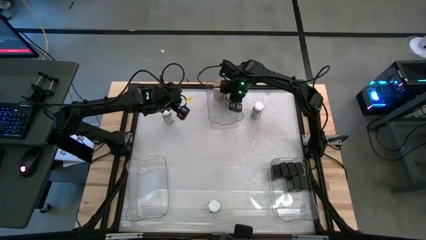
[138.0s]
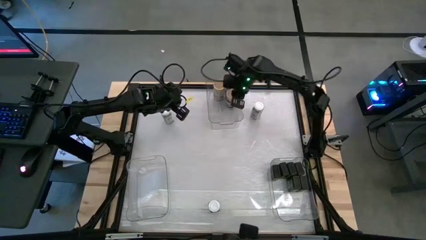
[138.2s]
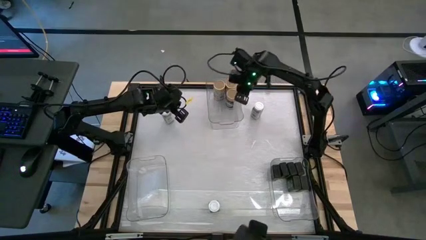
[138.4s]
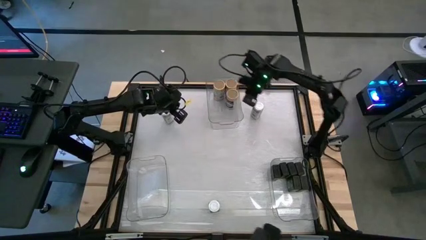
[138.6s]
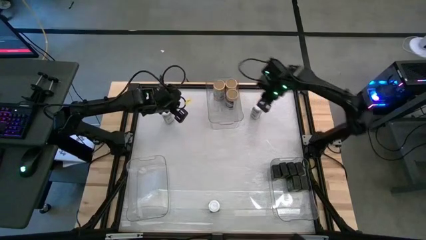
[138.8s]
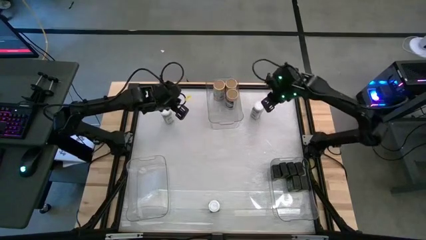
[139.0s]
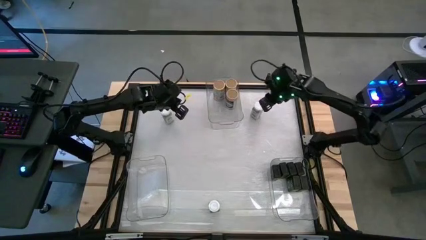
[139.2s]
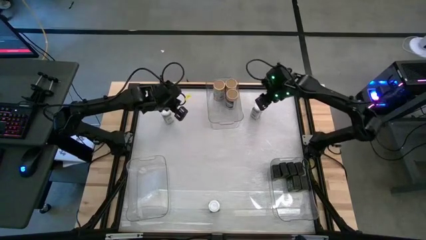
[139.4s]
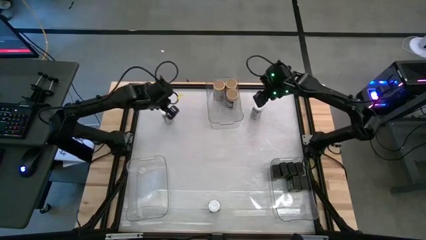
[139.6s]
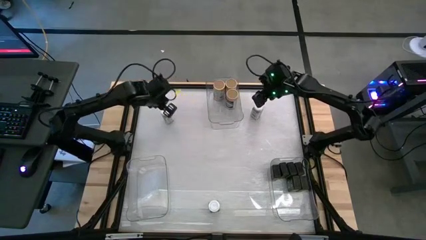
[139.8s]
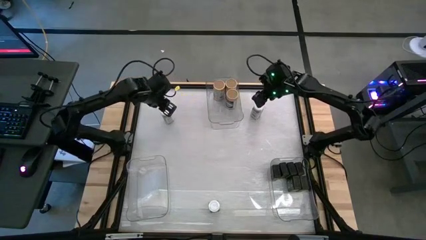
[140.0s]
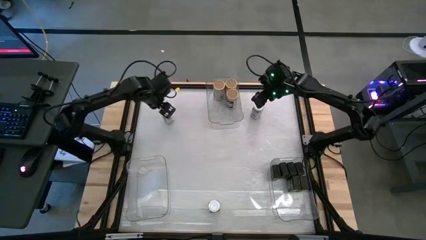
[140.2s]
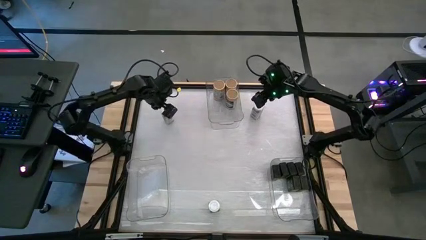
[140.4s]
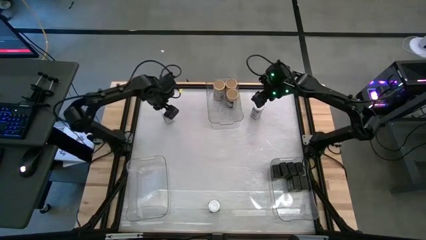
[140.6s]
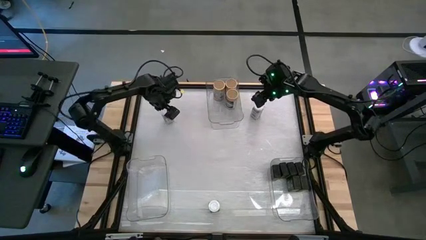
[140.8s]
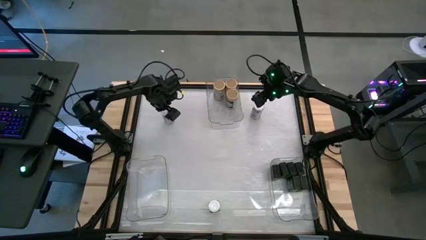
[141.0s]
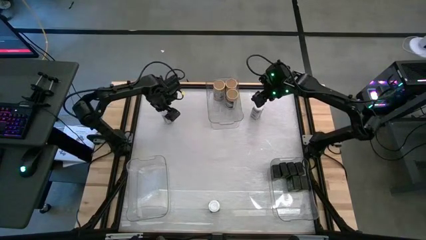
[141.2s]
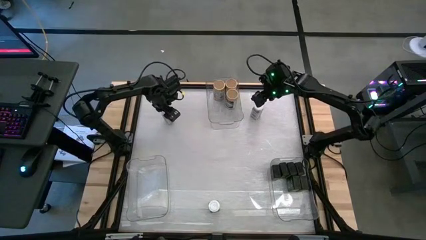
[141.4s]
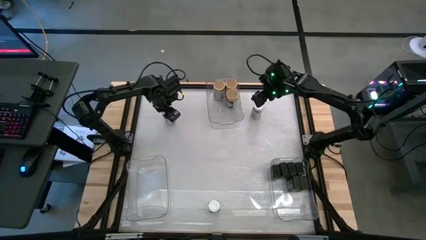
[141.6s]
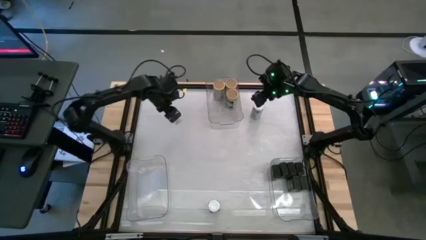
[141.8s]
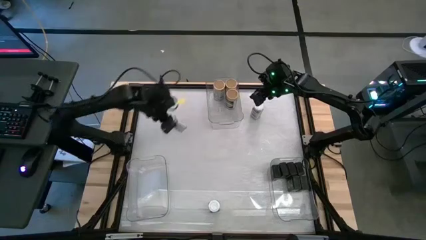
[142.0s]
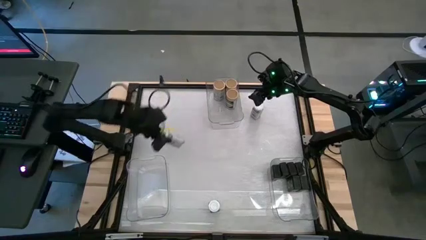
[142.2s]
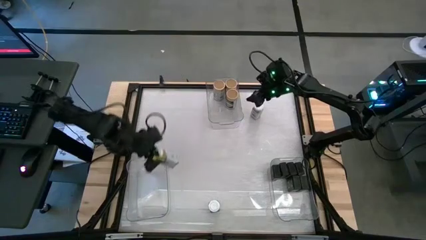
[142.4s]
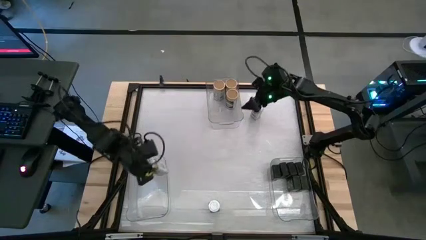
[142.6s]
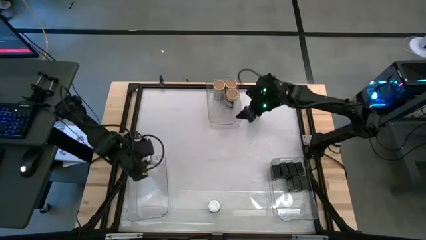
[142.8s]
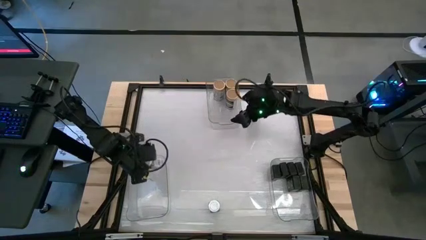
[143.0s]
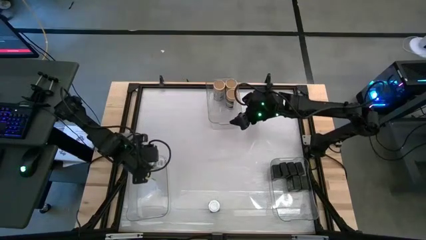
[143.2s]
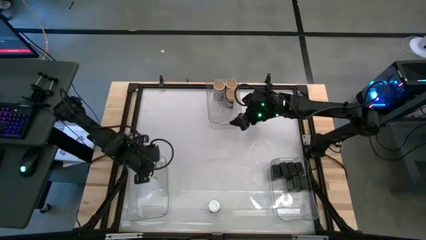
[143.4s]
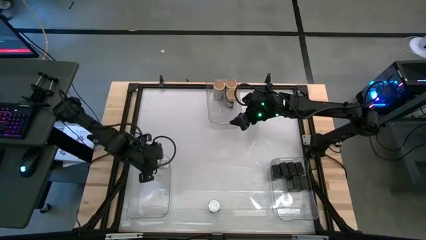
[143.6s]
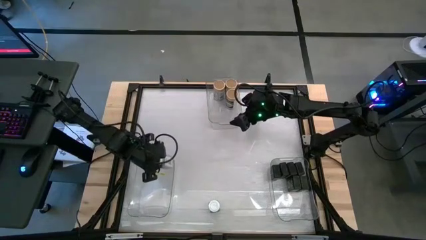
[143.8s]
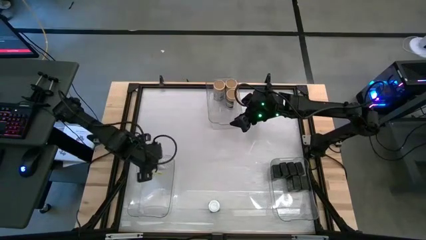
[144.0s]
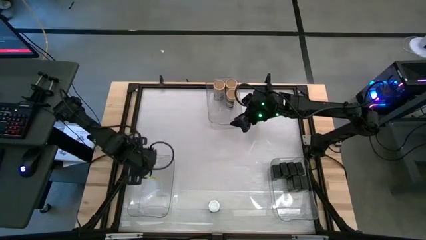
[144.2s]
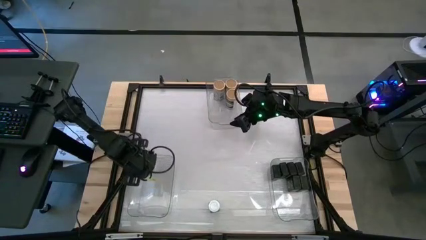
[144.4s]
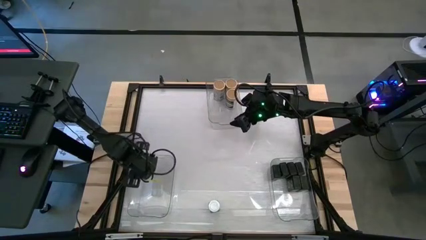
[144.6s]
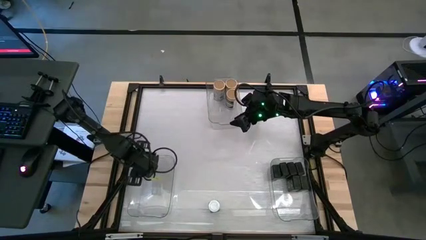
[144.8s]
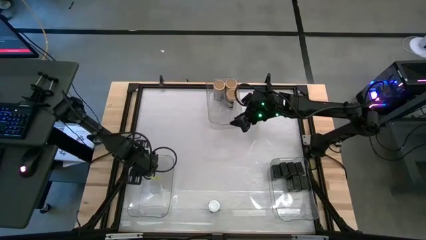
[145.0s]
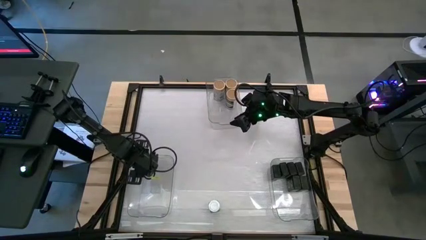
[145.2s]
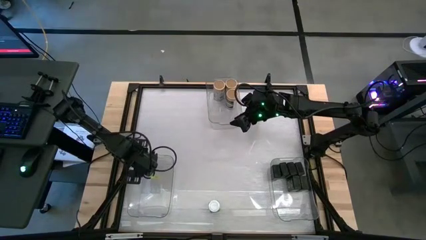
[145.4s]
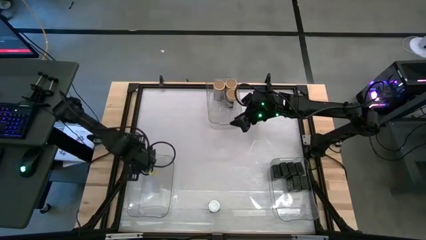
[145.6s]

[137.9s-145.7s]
Task: Sort spices by type
Put the white spice bottle into the left transparent bin

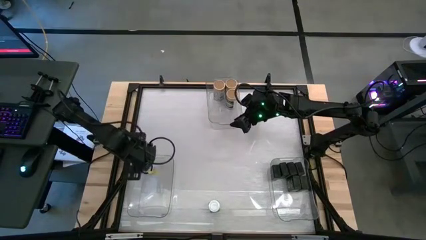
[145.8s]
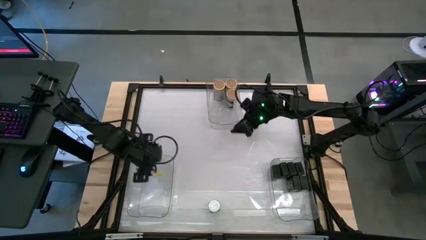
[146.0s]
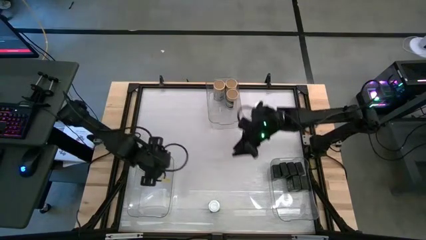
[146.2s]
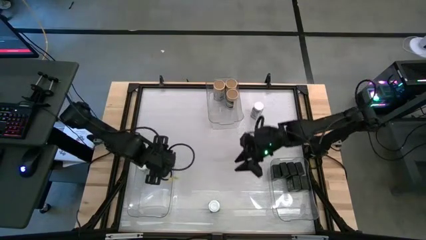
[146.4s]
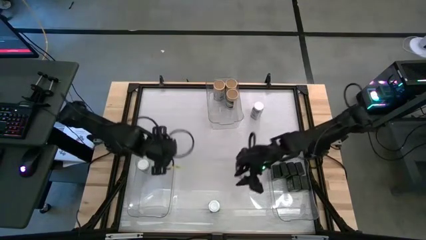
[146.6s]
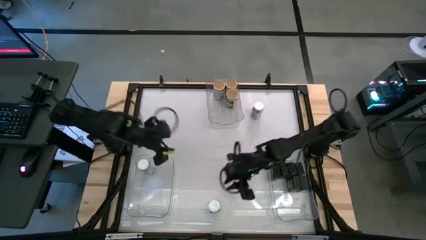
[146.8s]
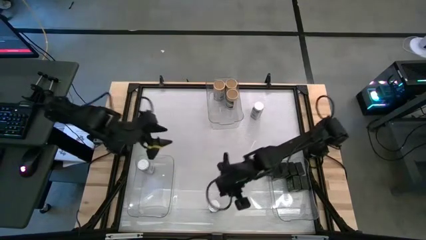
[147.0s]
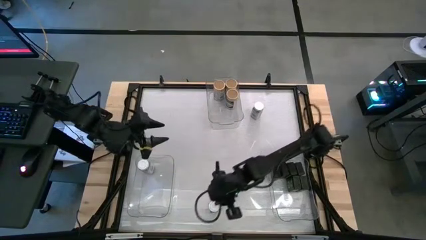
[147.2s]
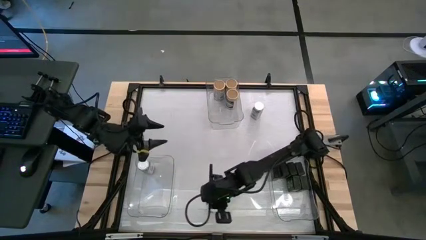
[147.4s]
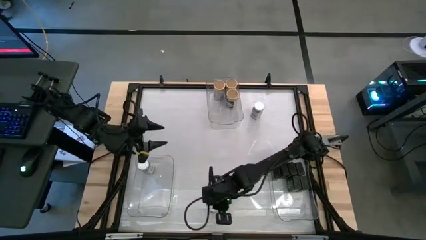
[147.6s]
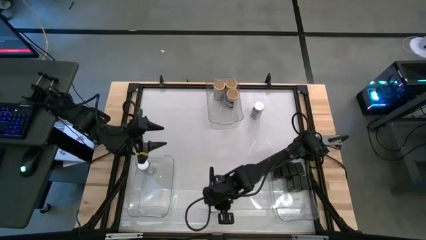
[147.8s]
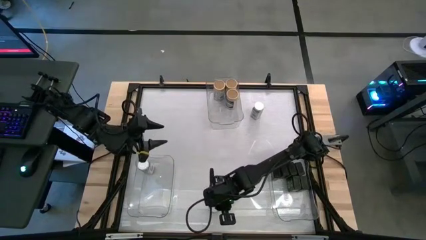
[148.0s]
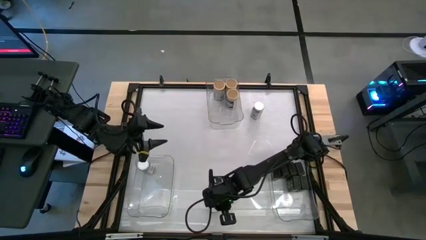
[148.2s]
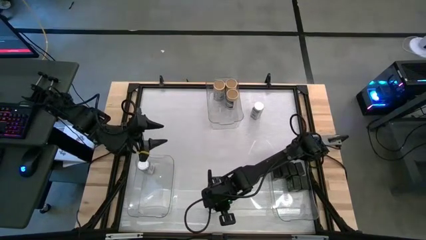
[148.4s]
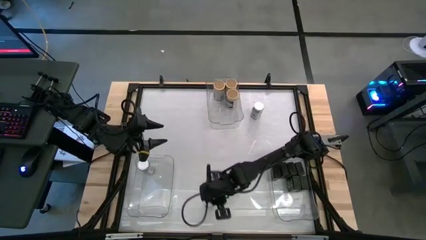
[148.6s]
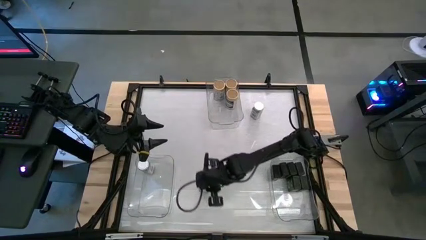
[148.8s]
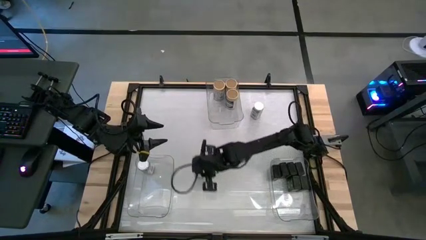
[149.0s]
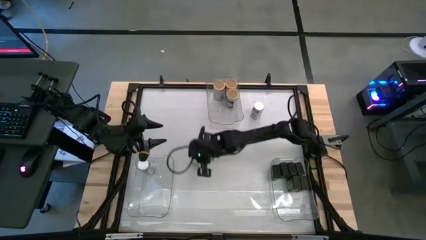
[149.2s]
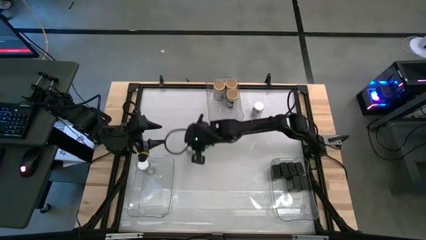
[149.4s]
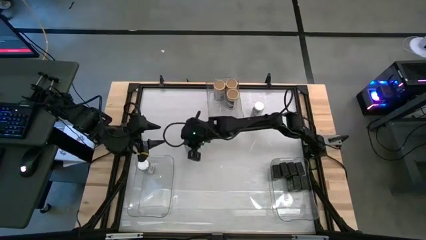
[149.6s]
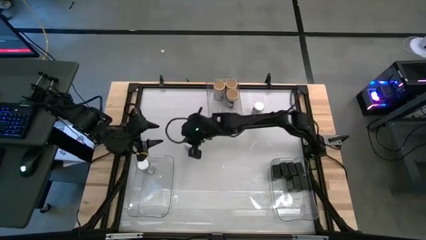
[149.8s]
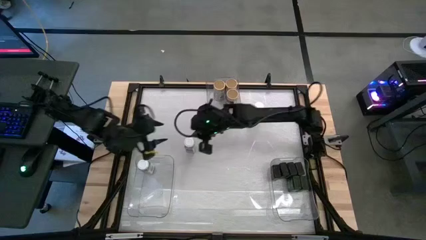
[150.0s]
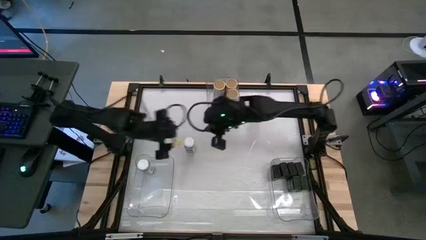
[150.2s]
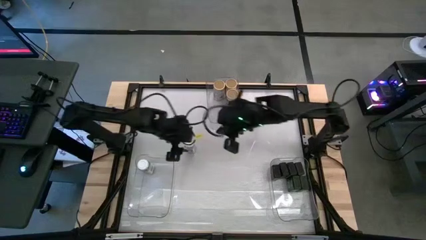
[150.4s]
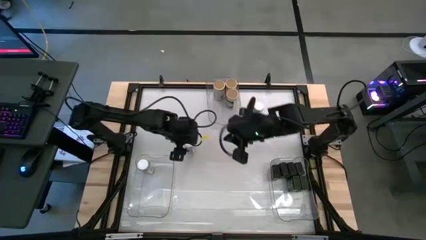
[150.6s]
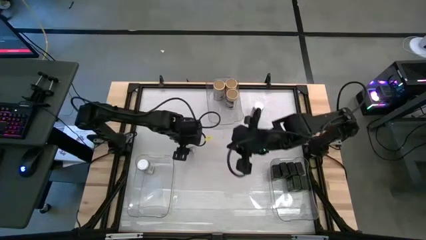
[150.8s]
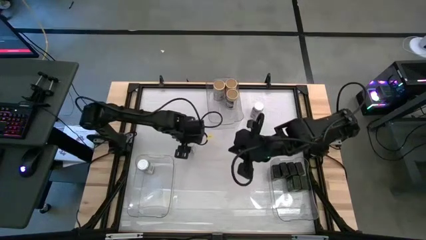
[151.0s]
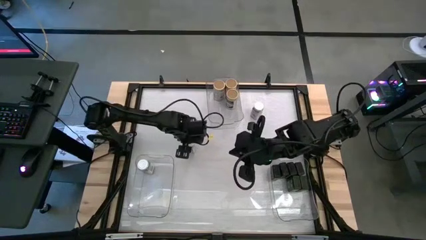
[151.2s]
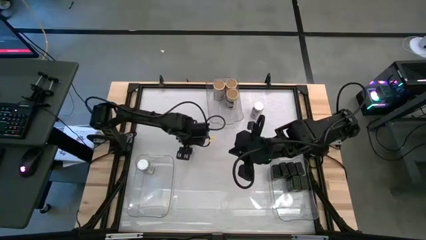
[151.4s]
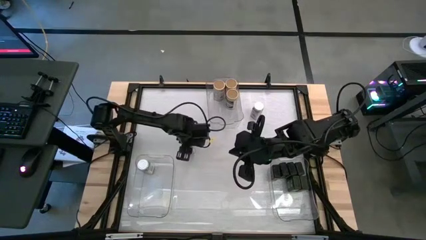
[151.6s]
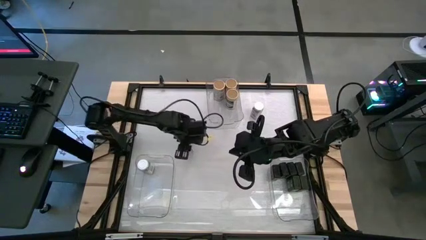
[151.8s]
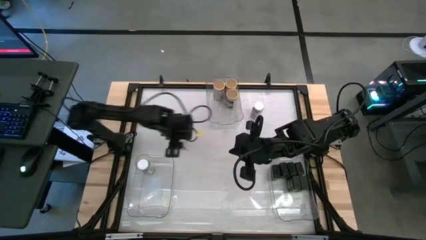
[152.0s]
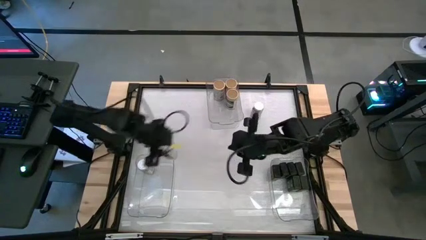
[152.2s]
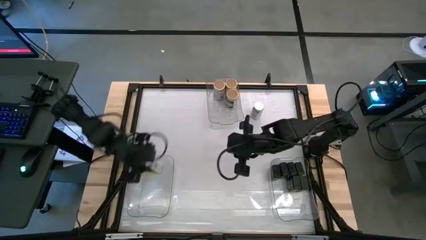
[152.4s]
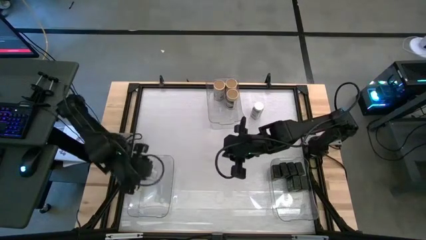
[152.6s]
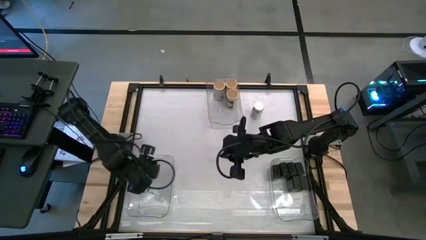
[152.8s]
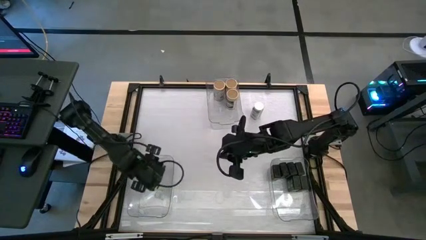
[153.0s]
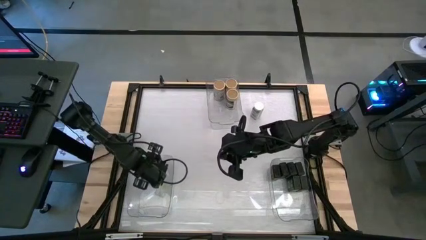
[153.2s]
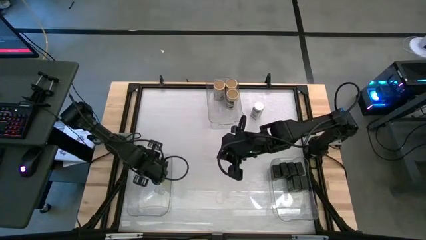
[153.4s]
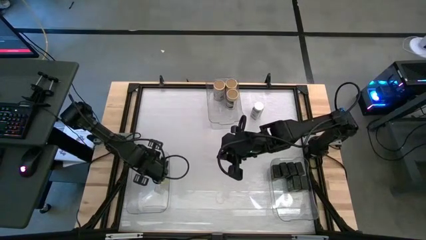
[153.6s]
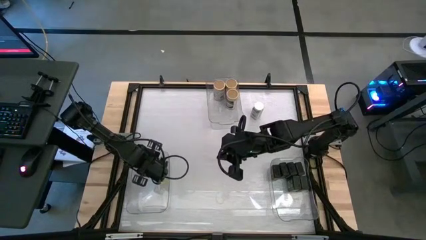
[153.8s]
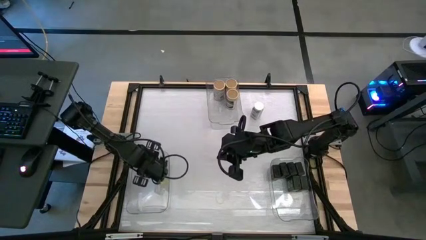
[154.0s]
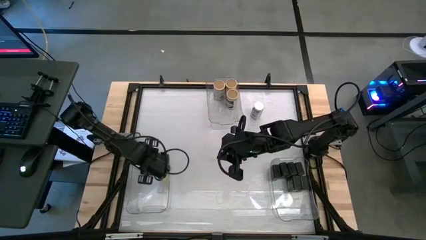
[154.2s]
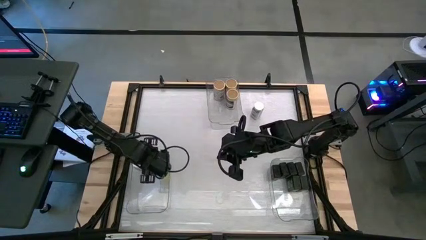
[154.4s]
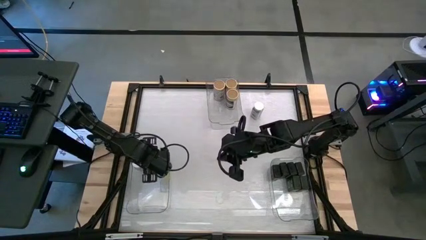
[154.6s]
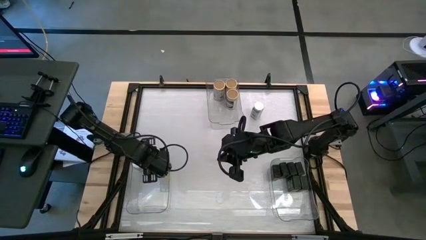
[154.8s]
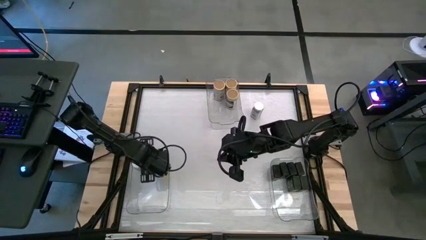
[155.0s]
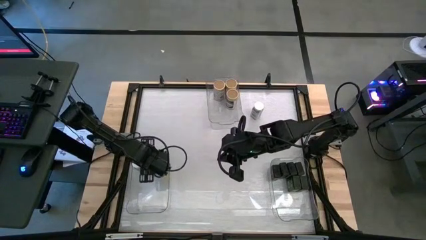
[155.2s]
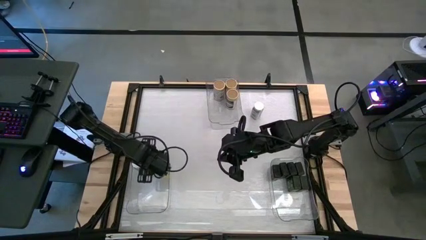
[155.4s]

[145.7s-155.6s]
Put the white spice bottle into the left transparent bin
